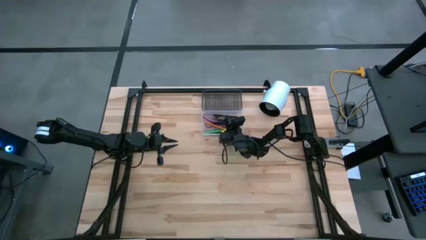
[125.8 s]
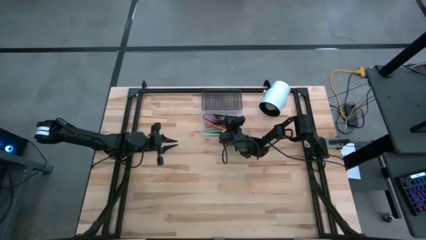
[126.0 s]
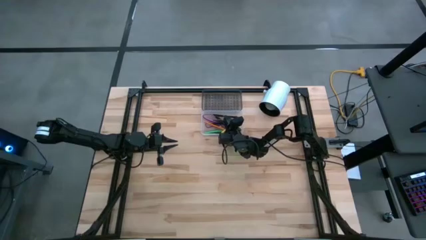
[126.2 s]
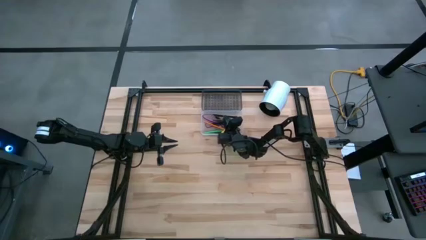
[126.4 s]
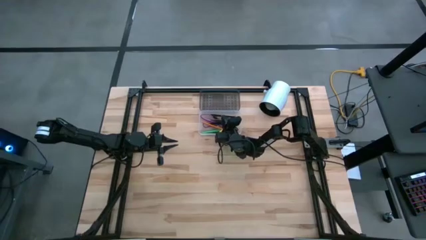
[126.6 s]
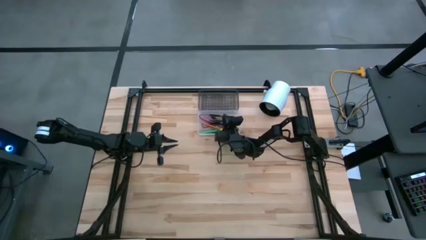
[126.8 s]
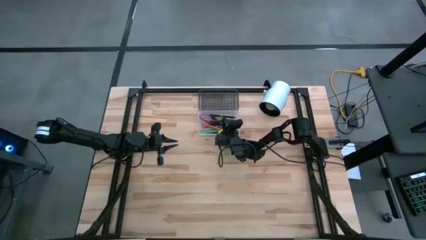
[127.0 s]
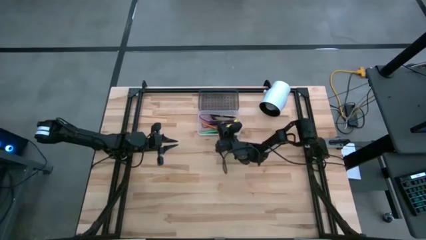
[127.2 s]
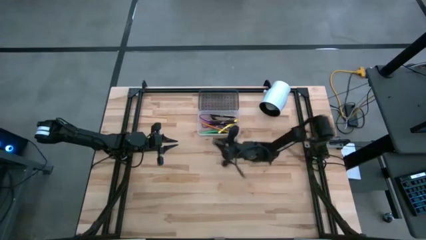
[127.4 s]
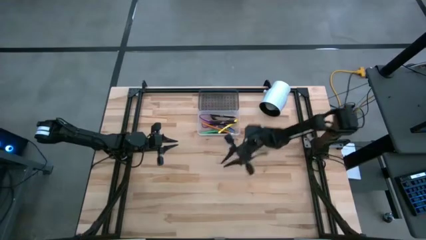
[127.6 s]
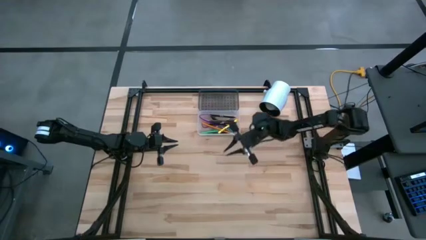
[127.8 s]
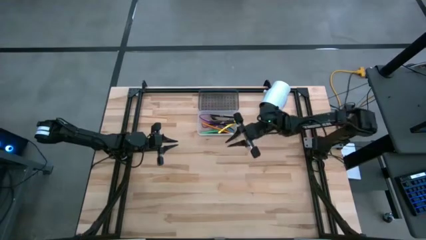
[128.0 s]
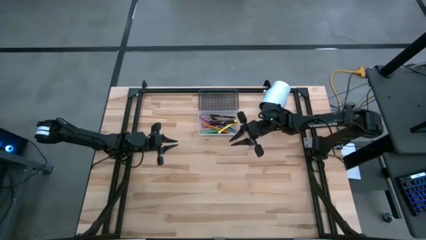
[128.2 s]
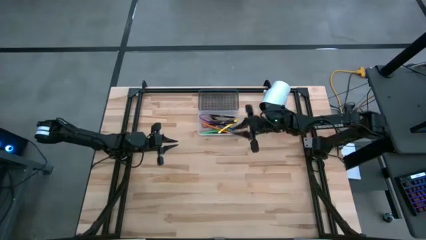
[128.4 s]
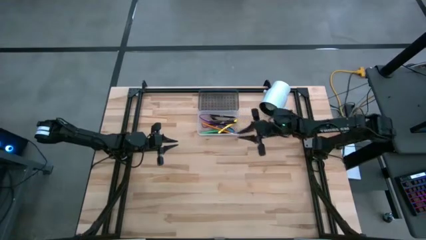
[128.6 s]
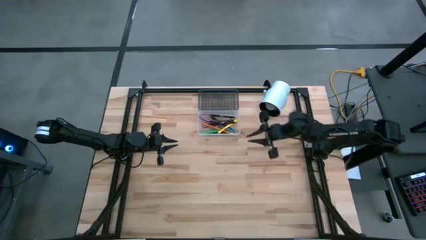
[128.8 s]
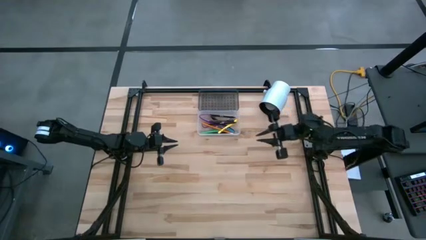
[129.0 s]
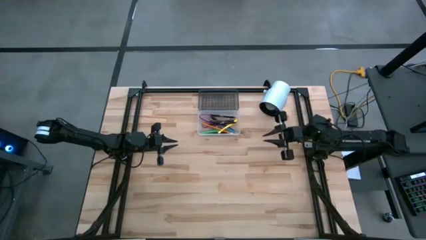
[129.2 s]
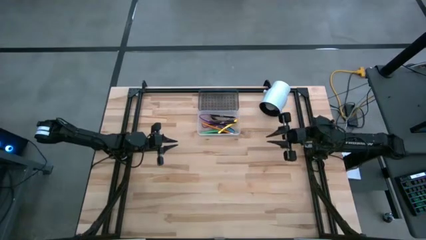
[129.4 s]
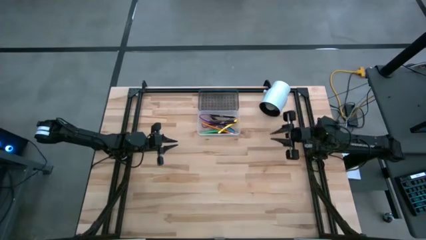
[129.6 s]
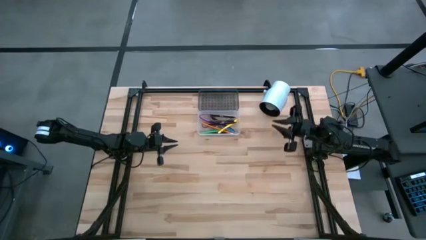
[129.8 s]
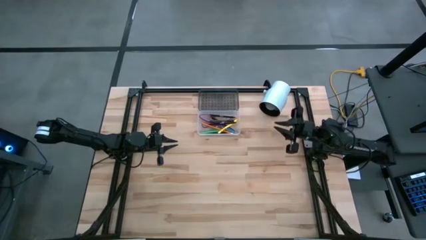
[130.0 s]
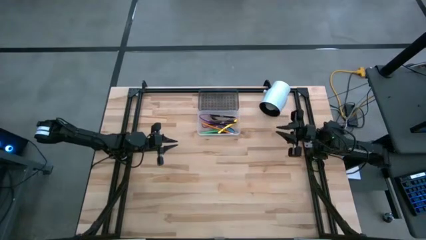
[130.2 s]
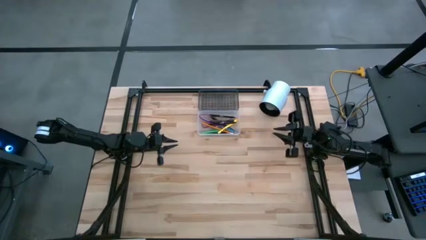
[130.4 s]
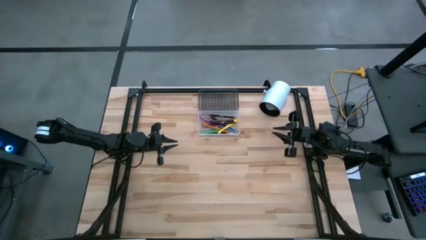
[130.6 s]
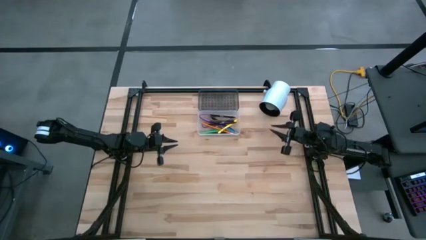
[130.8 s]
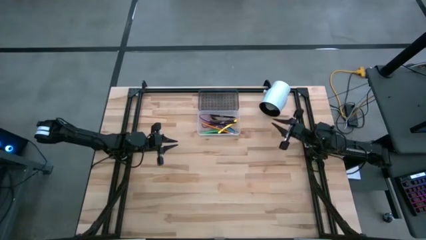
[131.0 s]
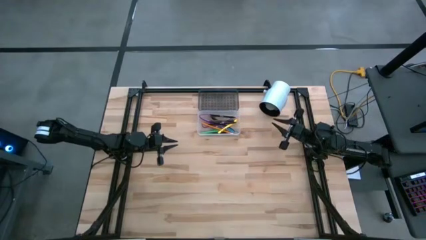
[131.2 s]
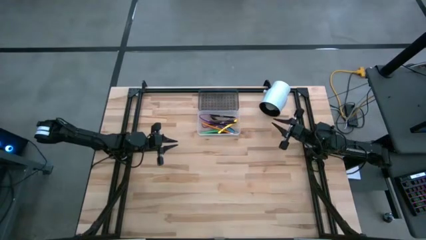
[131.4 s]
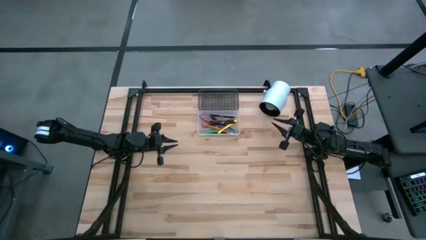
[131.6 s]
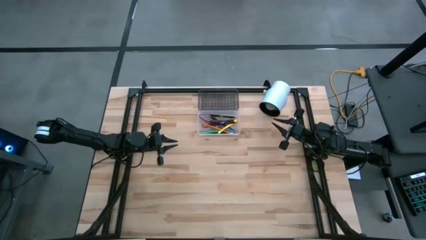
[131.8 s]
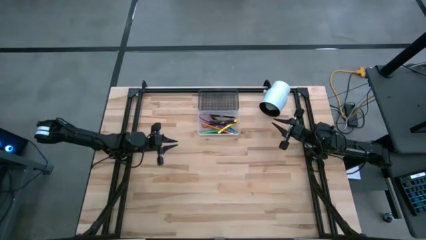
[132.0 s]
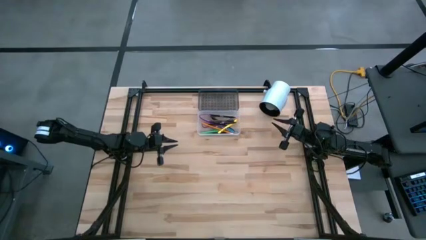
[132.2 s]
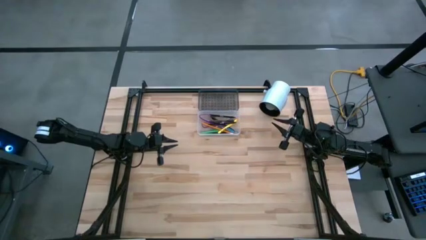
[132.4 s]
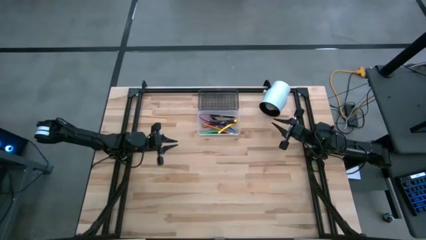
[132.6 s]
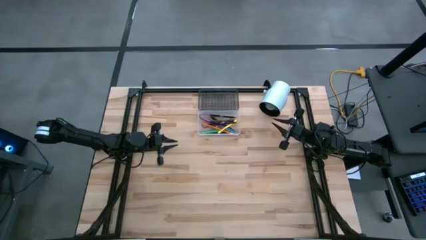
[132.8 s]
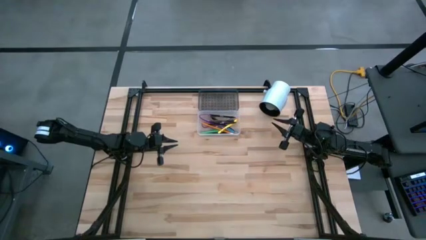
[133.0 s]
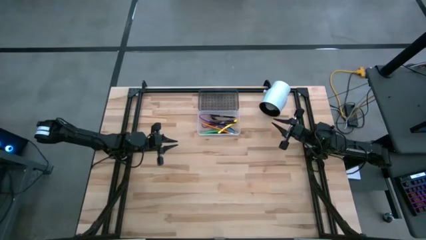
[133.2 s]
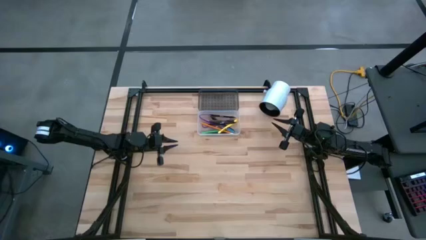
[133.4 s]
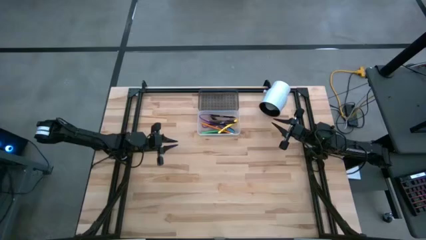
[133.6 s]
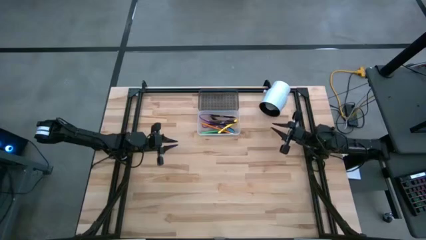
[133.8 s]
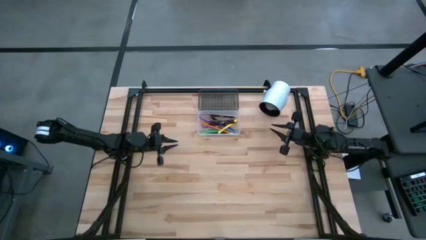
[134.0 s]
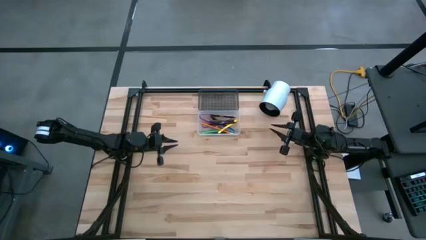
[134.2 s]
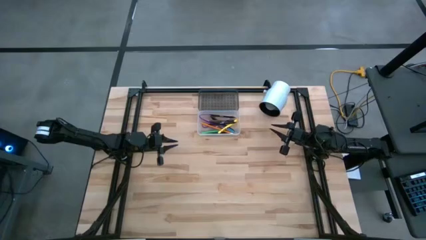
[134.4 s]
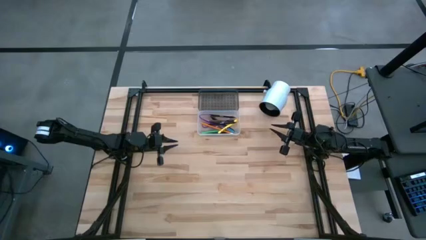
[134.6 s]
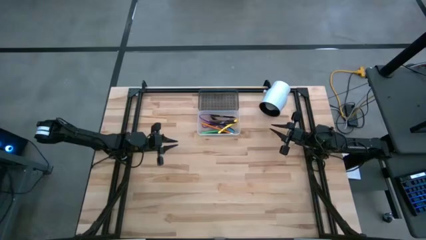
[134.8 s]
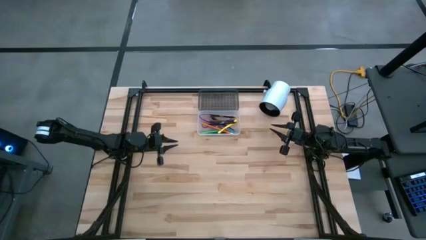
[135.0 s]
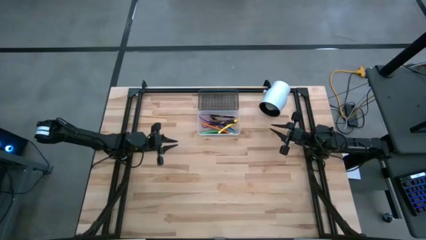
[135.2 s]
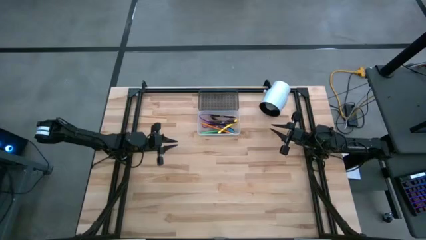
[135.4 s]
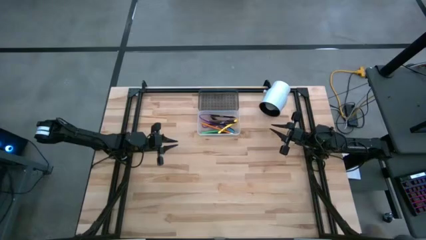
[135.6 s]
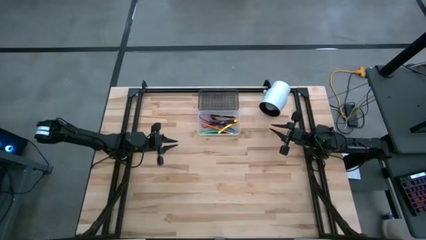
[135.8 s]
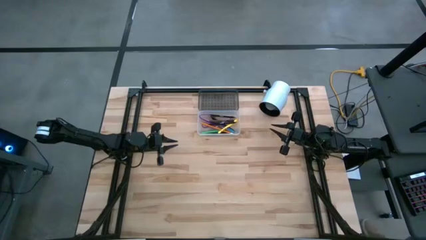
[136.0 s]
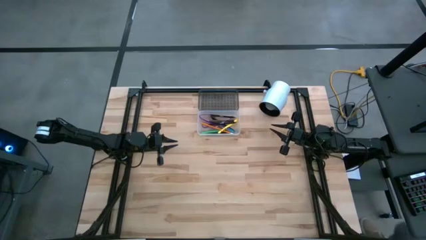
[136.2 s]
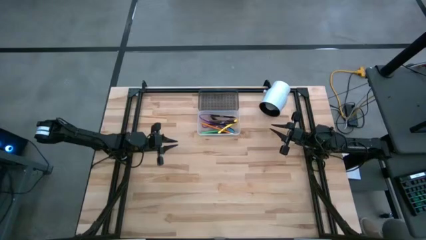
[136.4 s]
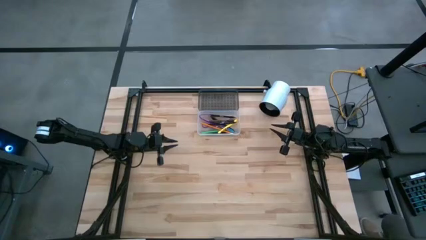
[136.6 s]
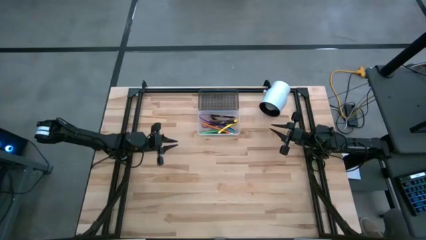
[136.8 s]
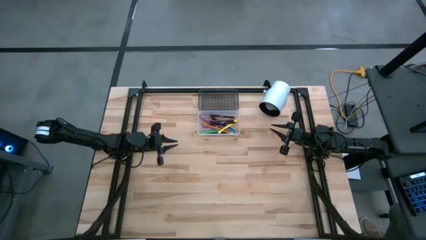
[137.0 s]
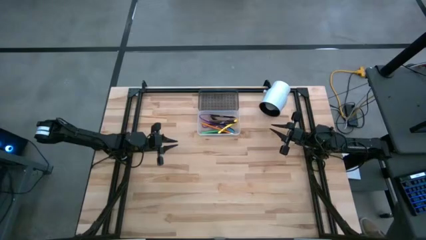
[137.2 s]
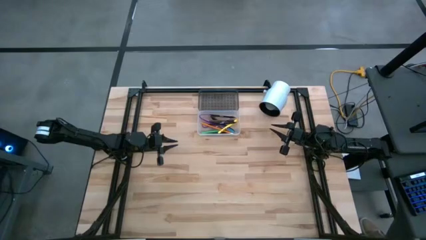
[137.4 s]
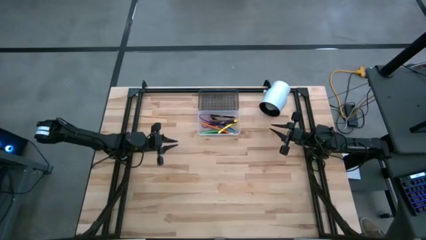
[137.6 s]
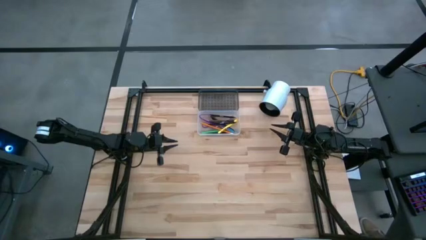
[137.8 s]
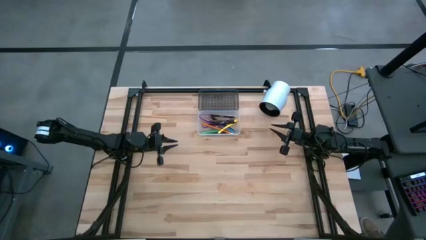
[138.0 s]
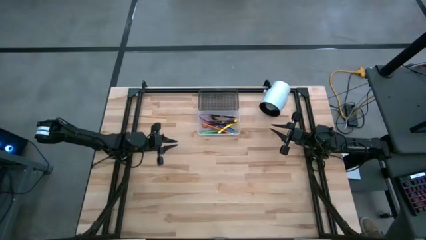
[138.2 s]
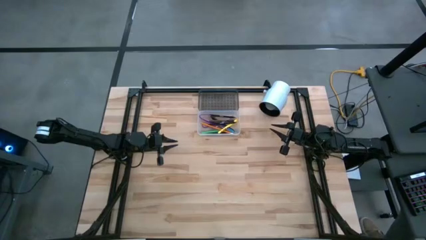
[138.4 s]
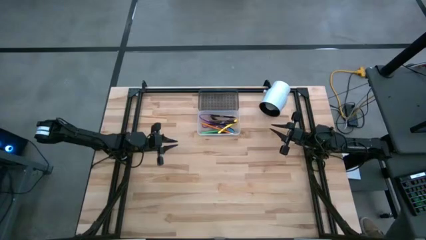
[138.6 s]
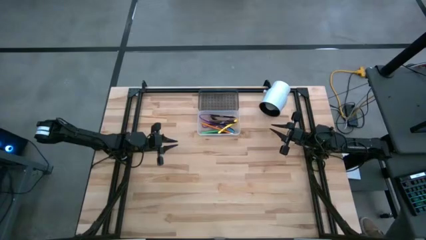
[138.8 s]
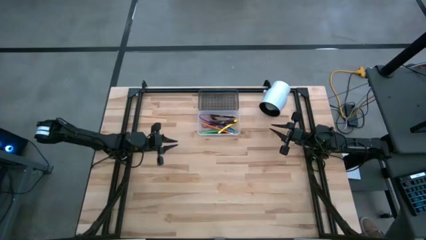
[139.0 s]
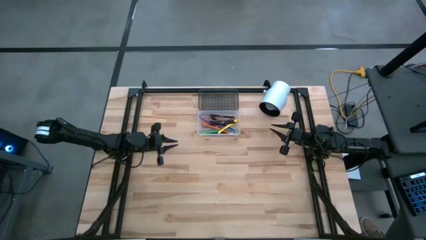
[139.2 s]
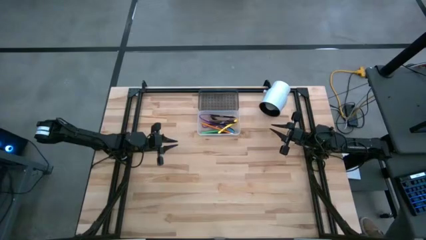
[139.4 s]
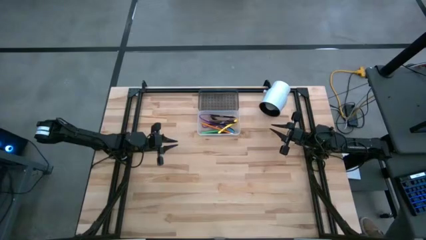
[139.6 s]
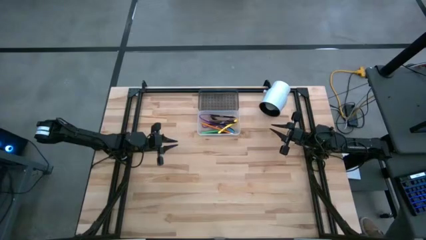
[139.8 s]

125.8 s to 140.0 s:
Task: Pick & place school supplies into a supply box
Return to Home Position

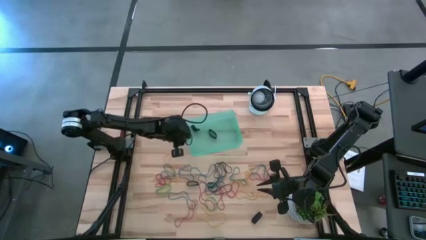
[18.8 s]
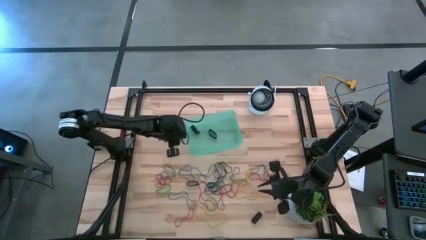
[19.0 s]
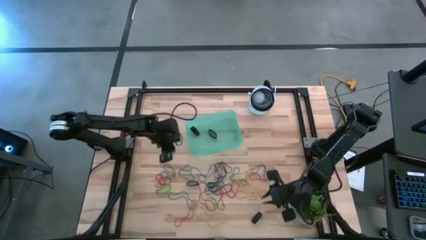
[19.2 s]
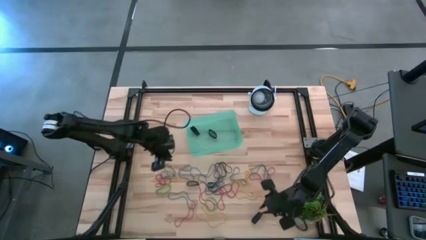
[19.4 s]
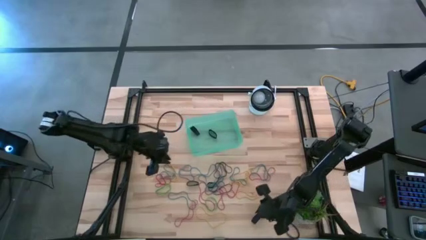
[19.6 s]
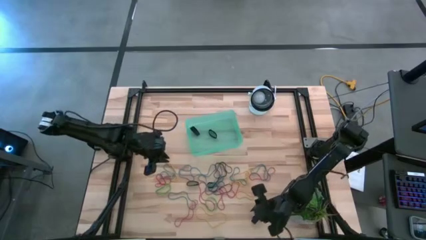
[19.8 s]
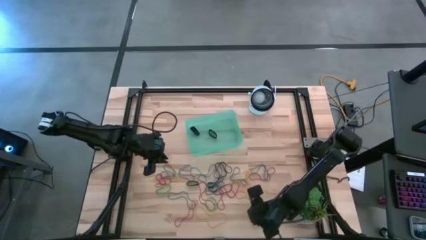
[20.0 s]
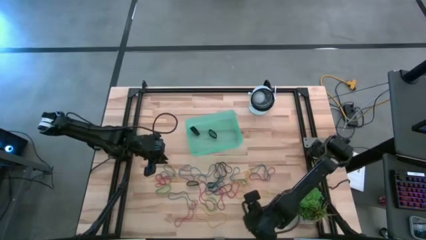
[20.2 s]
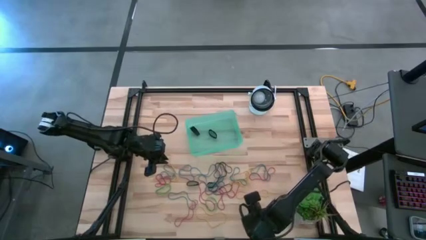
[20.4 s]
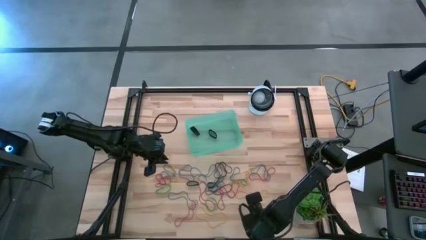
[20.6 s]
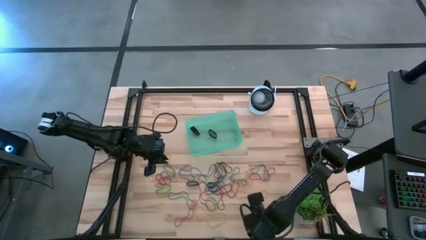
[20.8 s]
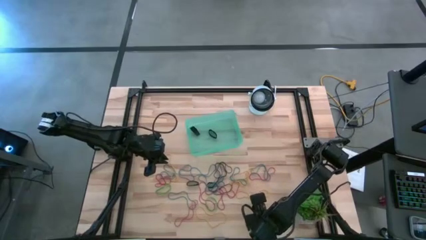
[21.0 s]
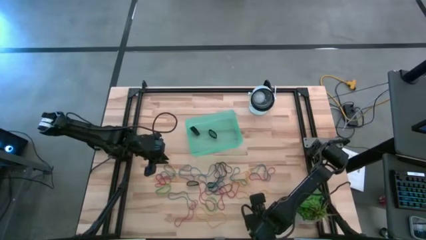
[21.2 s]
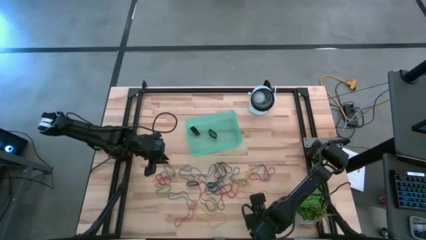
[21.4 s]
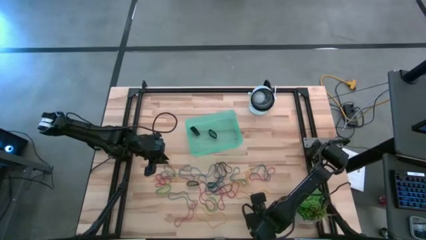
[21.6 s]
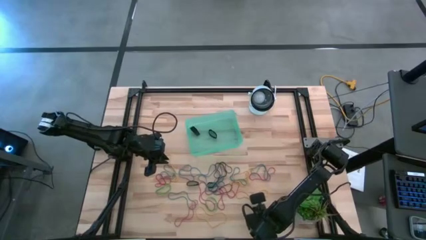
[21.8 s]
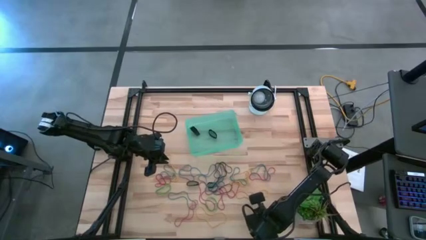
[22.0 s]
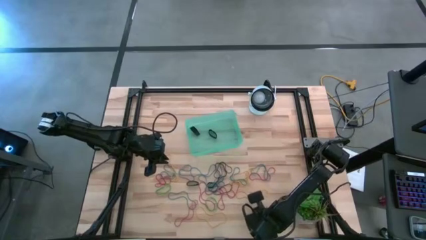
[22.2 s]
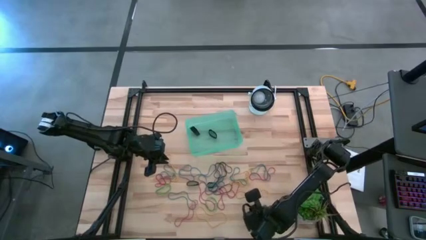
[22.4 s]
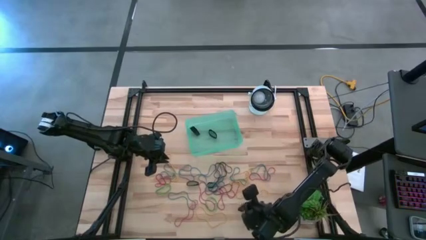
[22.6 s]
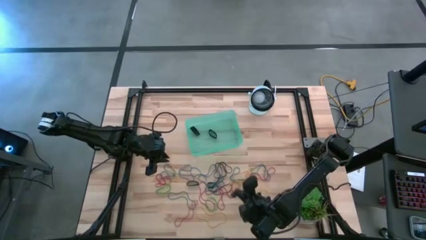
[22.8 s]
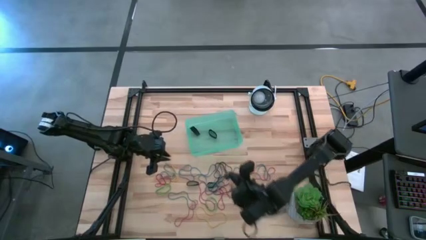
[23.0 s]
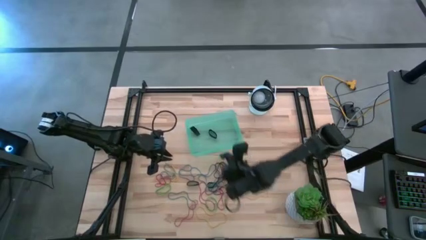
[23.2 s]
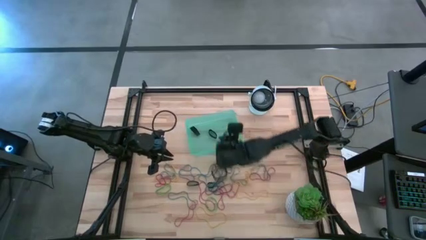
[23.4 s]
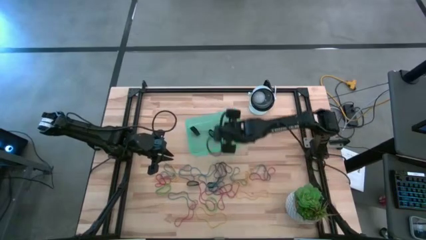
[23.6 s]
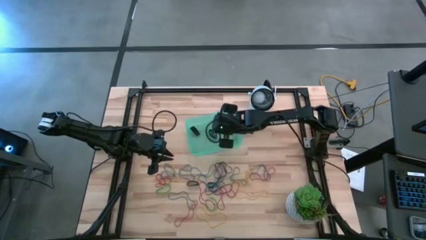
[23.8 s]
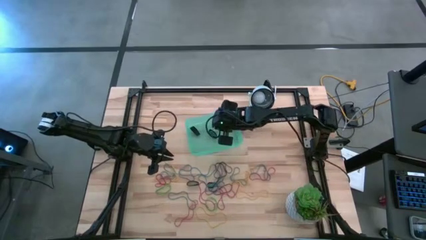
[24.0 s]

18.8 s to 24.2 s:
Task: Pick and place rubber bands into bin
Put the black rubber band into the green bin
